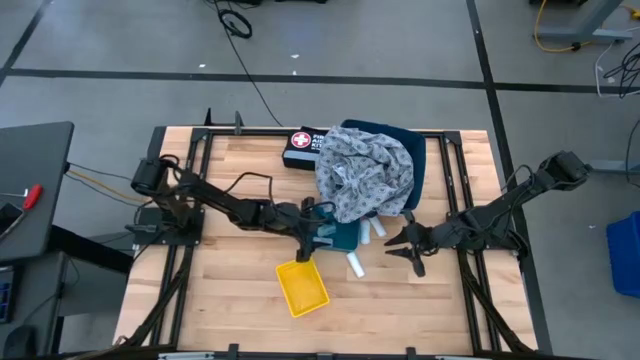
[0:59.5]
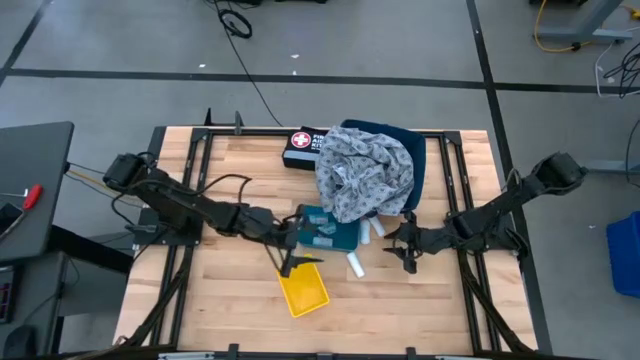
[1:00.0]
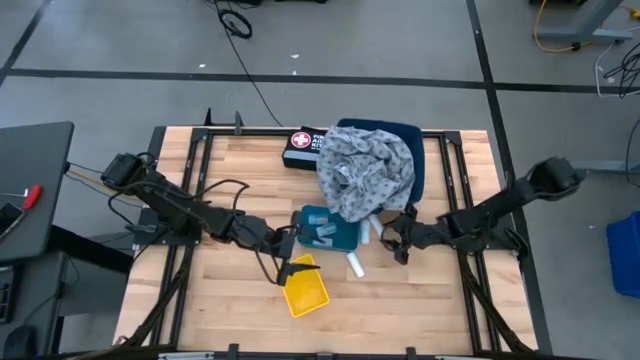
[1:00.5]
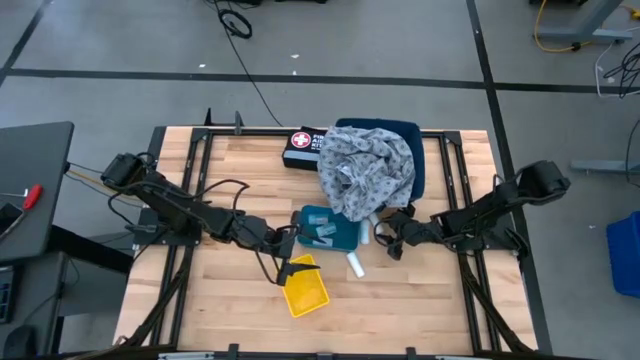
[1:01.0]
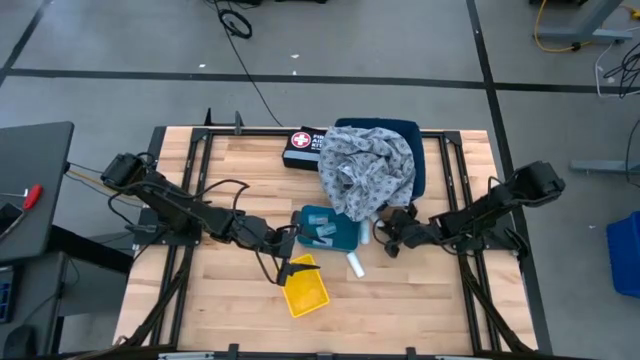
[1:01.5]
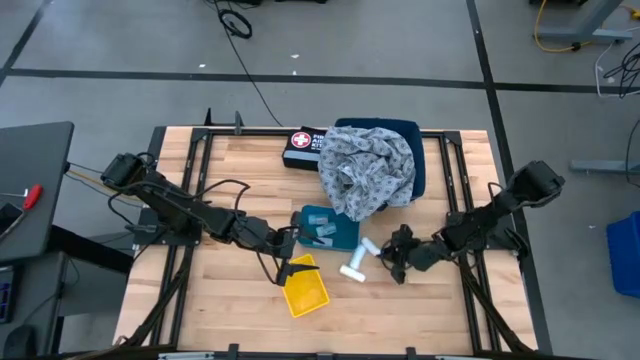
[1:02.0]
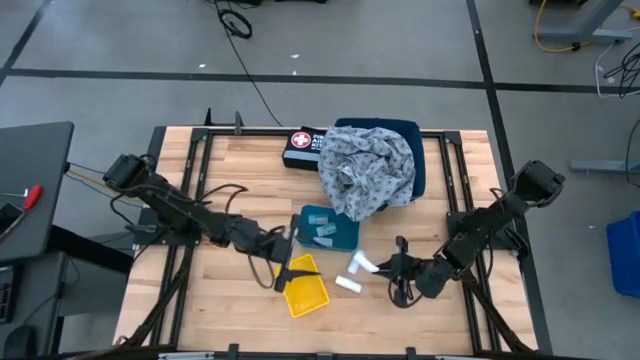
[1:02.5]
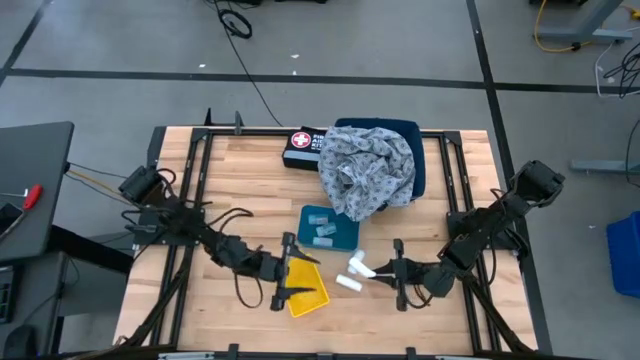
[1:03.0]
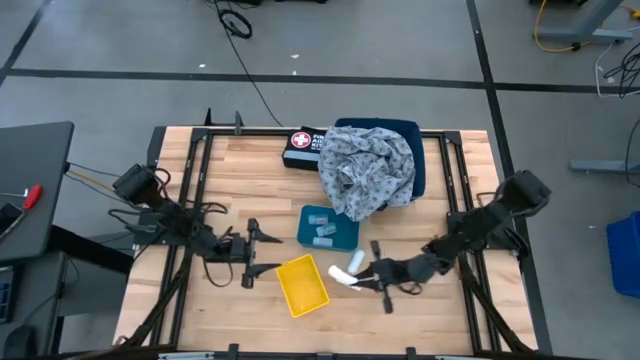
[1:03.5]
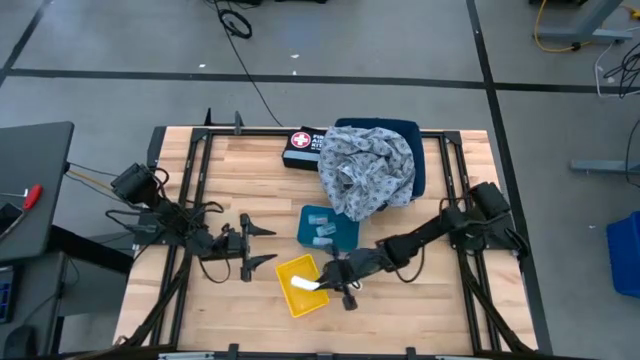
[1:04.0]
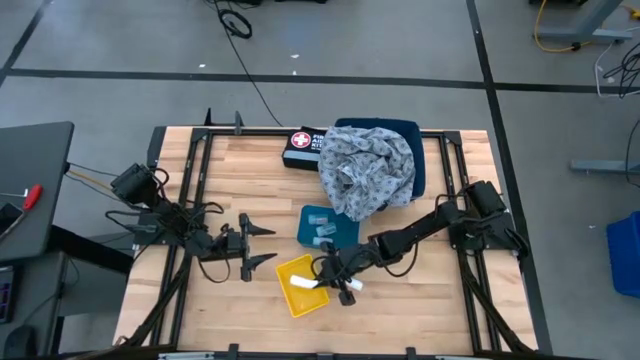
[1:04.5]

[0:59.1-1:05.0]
Task: Pick & place medical supplies in basket/bin
Put the top white rolled gauze into the yellow bin

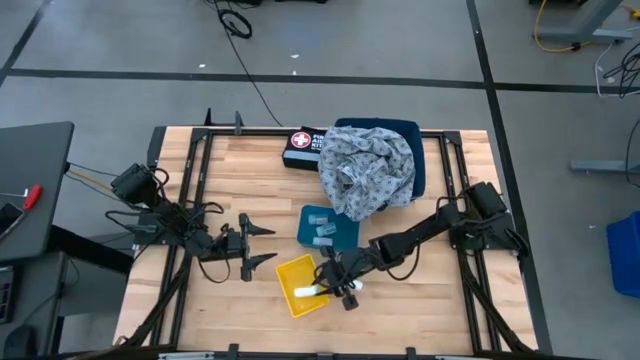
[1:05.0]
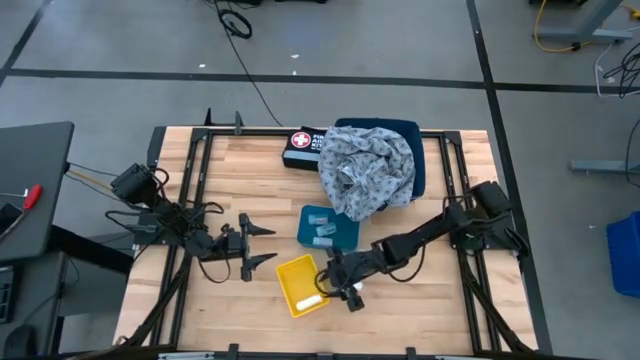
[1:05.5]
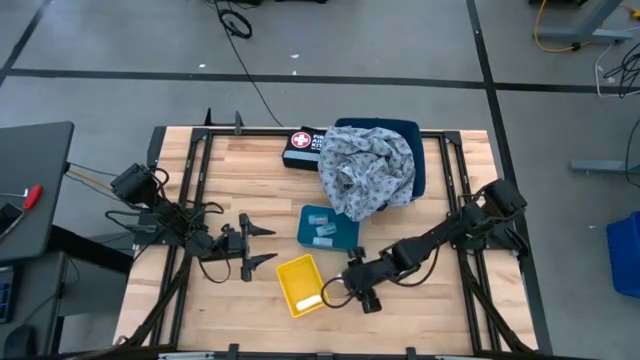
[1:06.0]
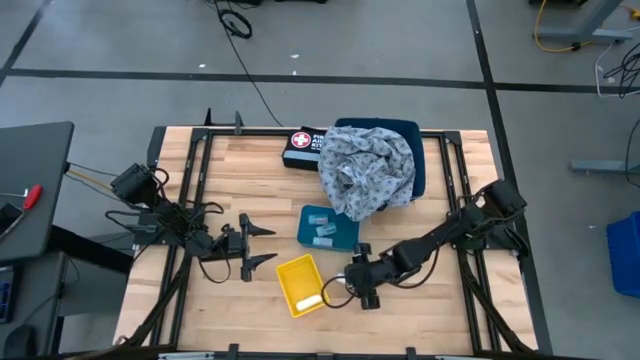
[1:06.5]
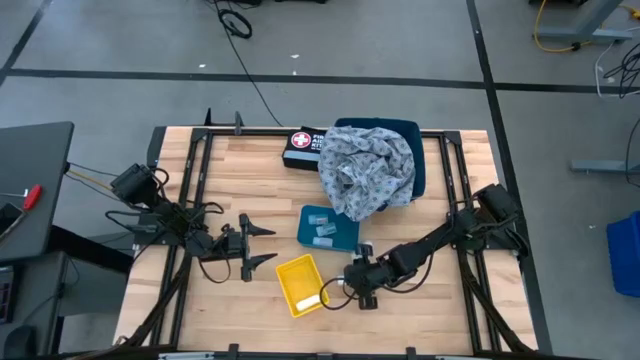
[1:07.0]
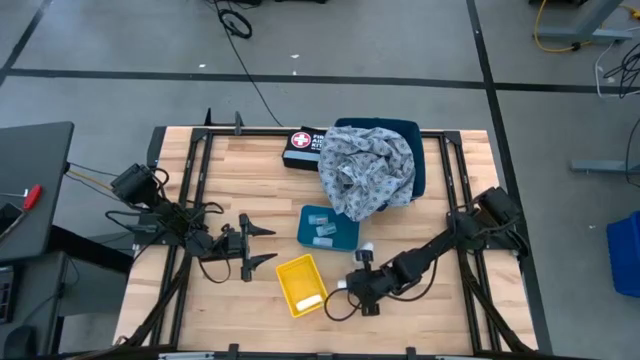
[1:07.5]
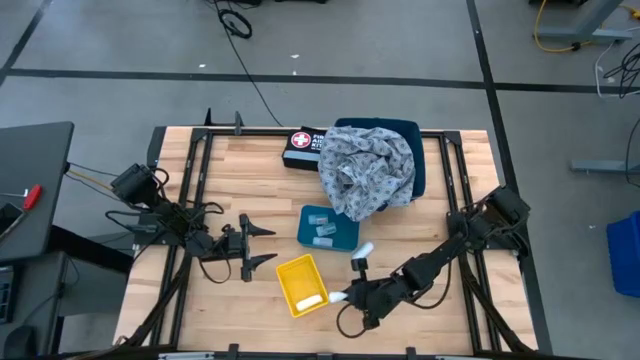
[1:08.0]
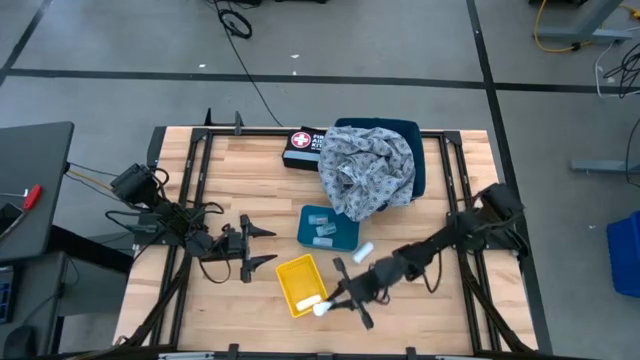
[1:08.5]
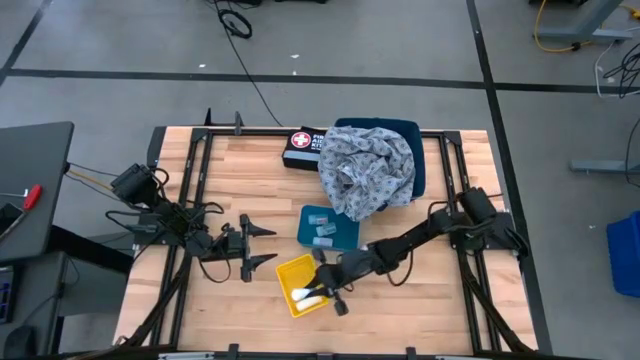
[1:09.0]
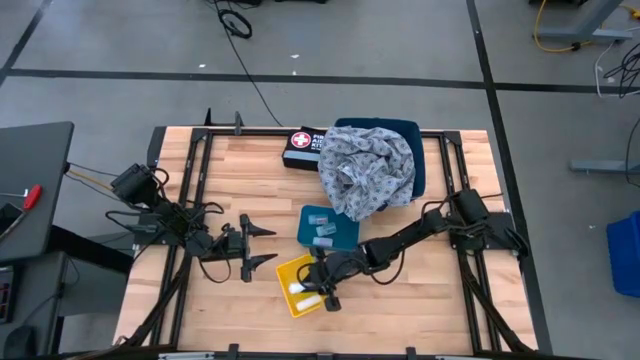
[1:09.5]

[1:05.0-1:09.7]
Put the bottom white rolled gauze into the yellow bin

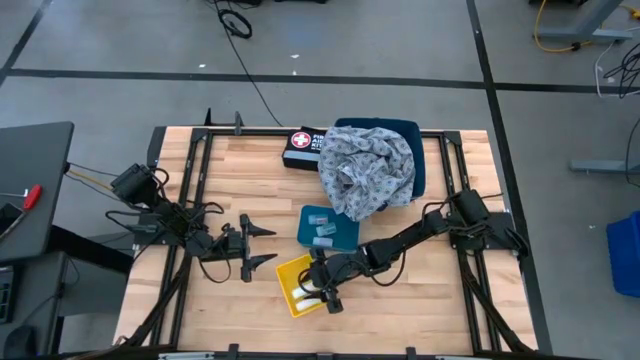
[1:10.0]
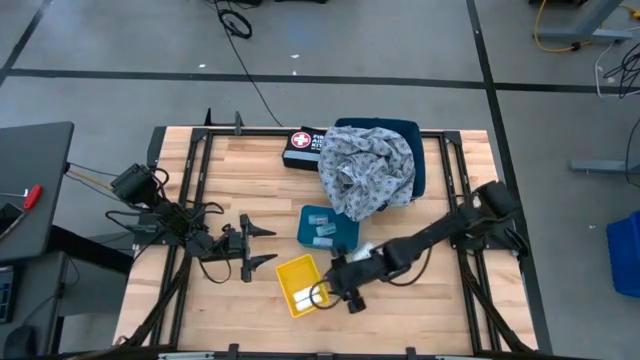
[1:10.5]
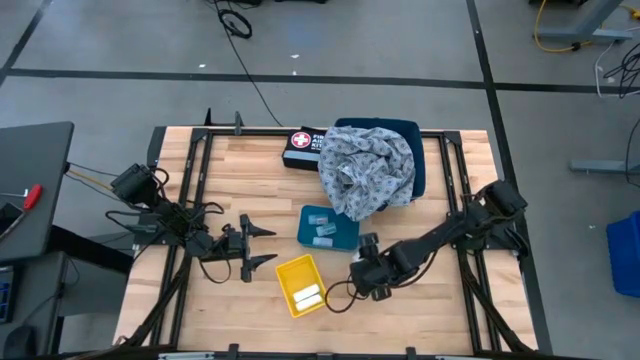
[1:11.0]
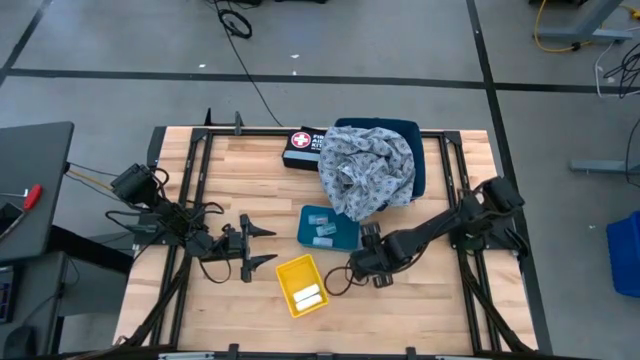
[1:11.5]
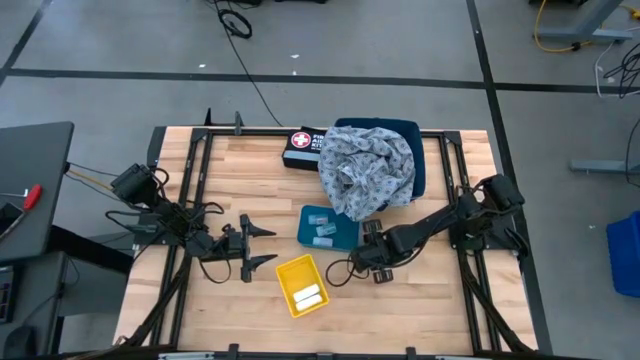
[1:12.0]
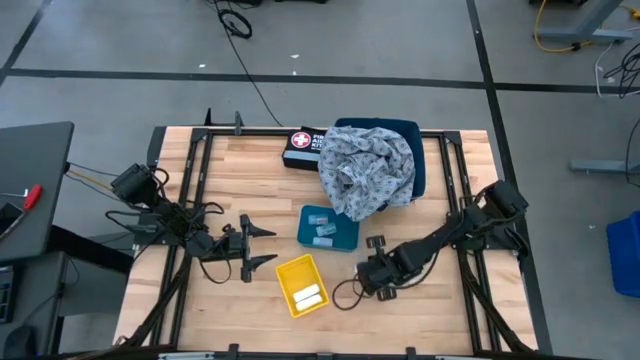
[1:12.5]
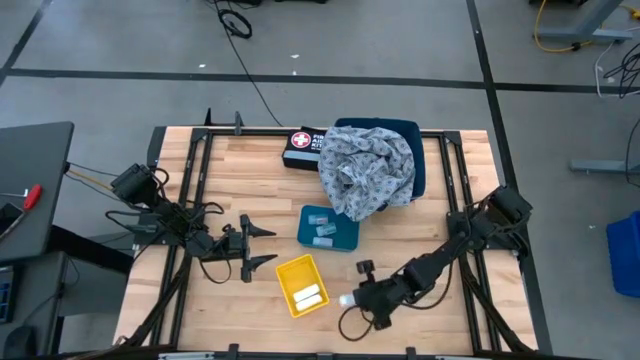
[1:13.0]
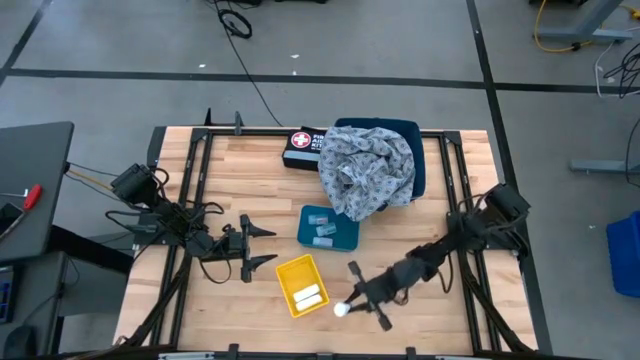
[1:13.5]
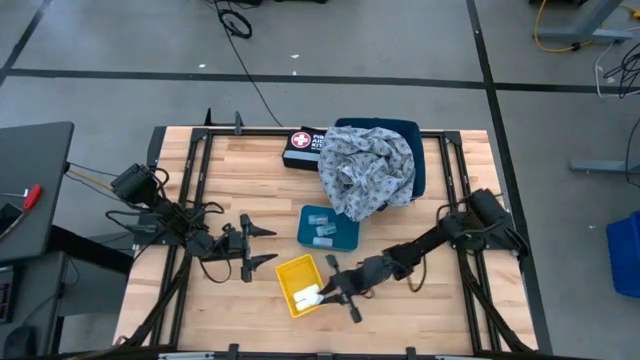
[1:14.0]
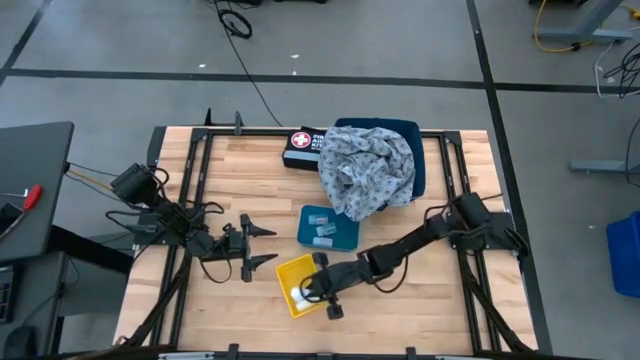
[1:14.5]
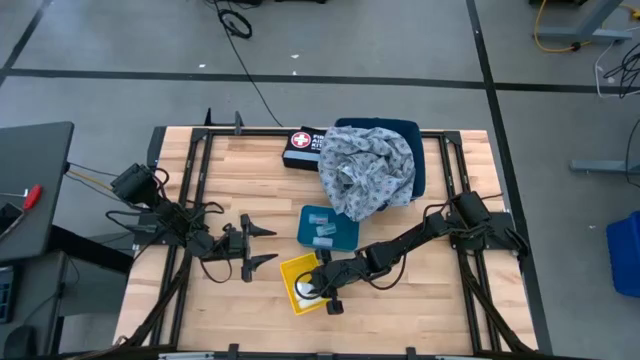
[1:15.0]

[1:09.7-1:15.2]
Put the white rolled gauze into the yellow bin

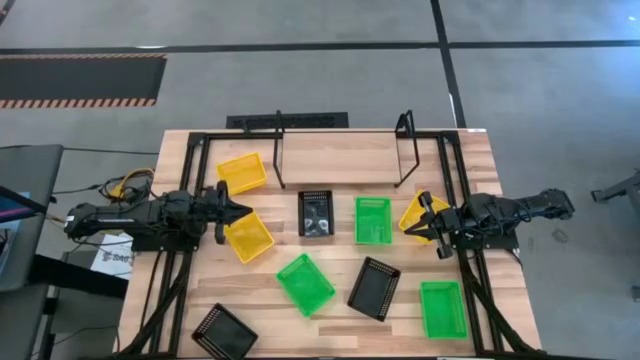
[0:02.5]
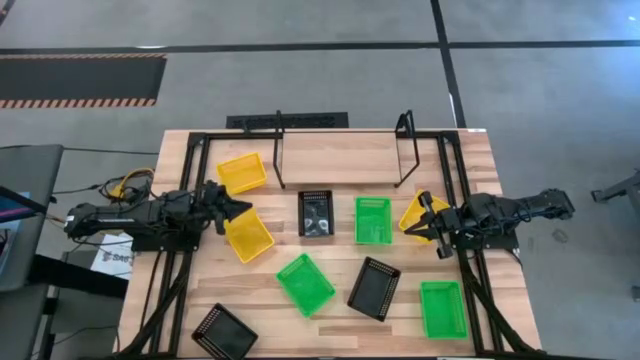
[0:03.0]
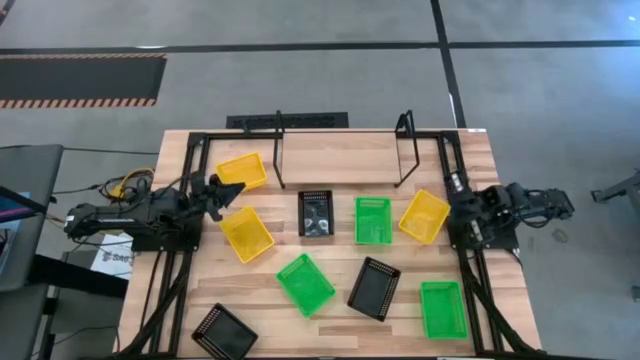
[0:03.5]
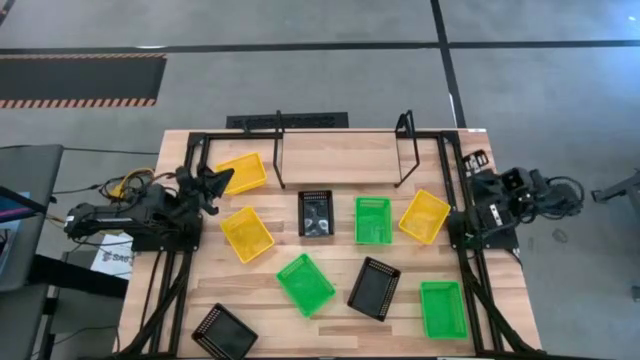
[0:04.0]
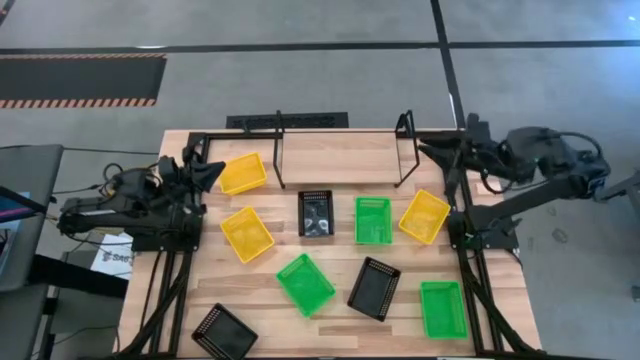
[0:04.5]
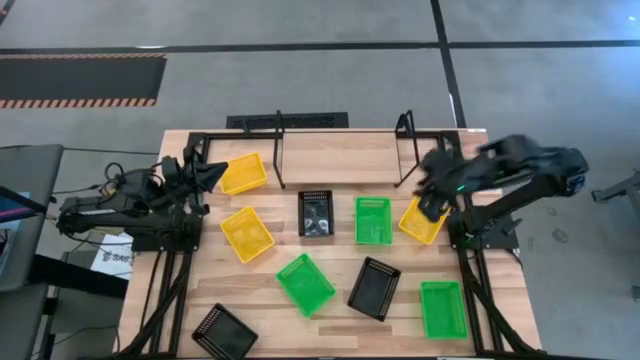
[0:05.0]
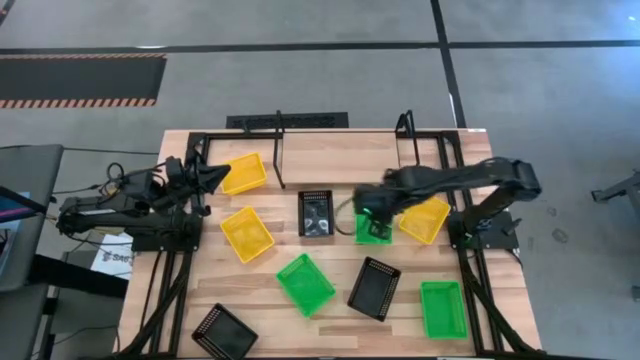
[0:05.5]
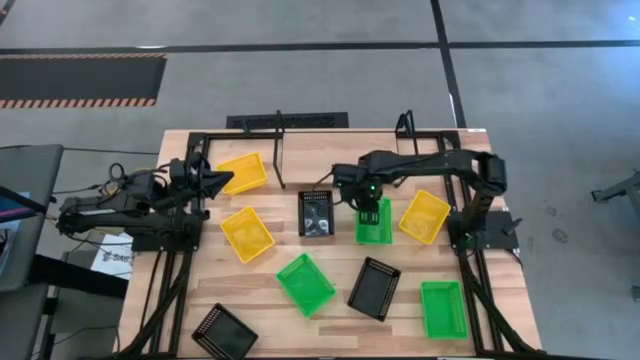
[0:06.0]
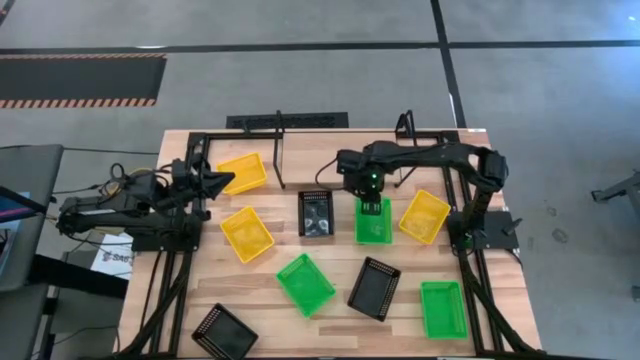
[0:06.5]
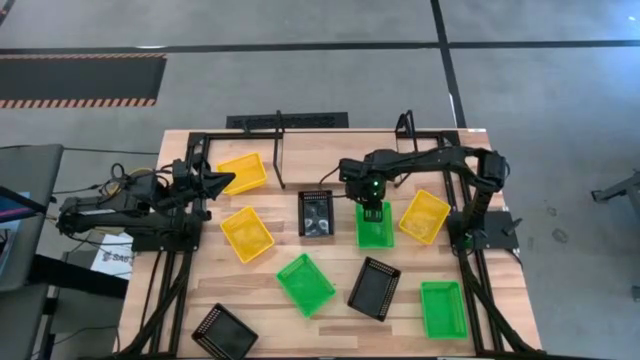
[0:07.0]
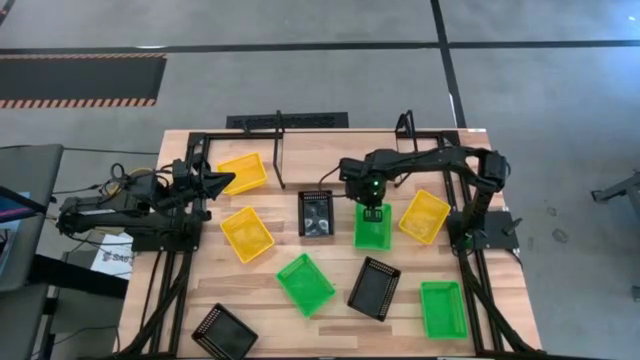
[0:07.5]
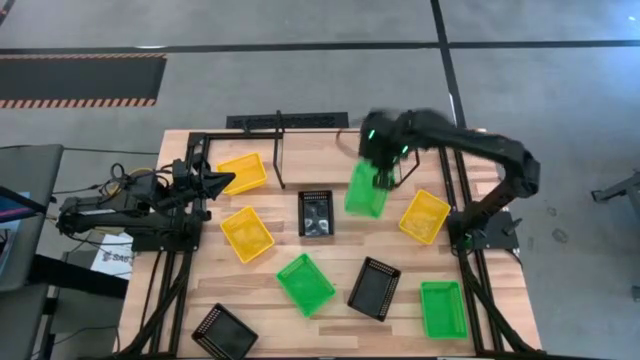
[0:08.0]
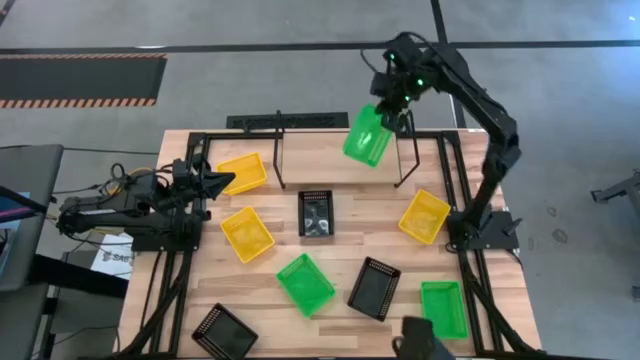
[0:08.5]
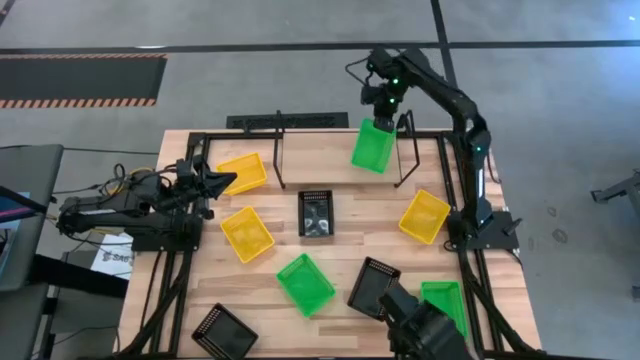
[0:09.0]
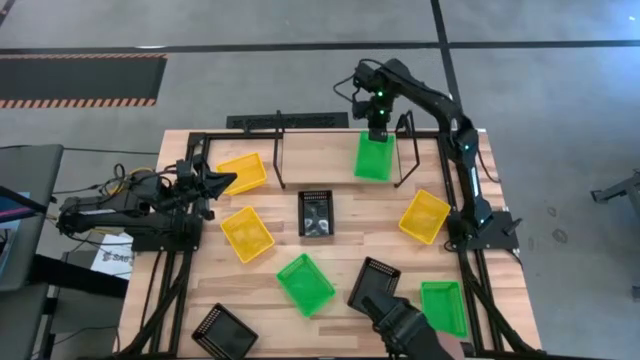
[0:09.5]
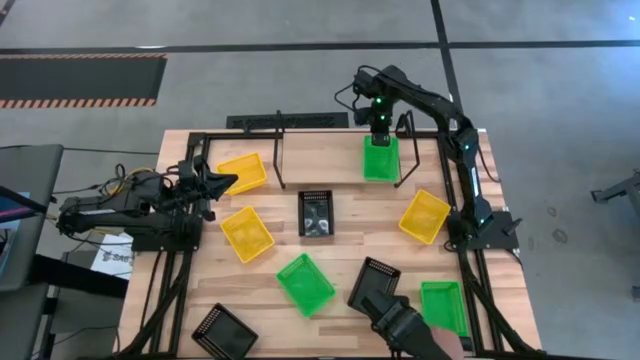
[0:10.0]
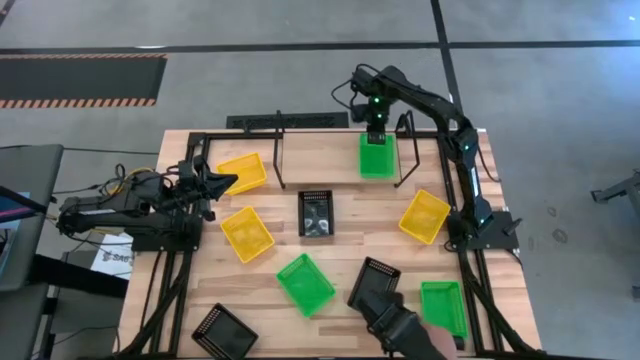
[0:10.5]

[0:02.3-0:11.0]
Task: Stack baskets on shelf by color
Put the top green bin on the shelf
